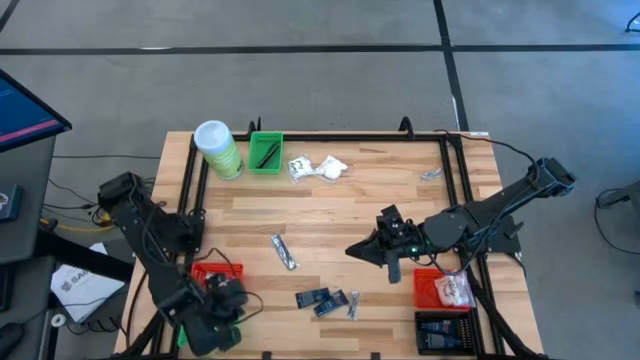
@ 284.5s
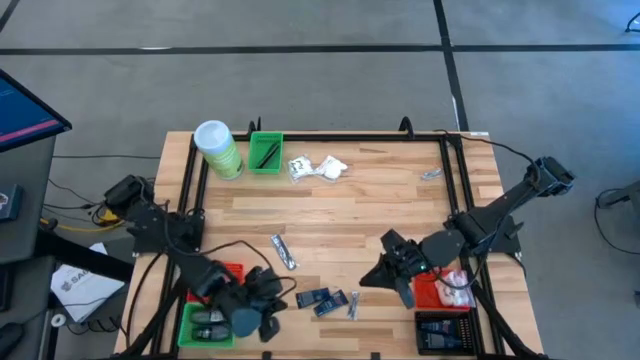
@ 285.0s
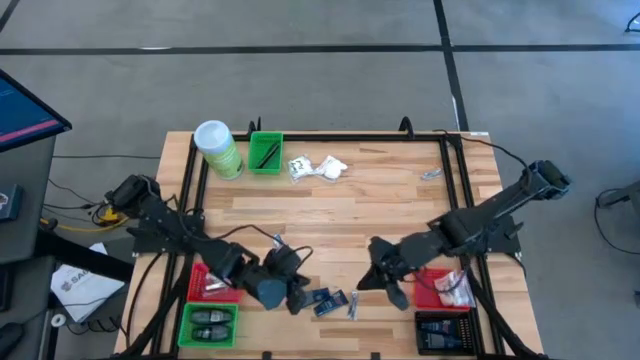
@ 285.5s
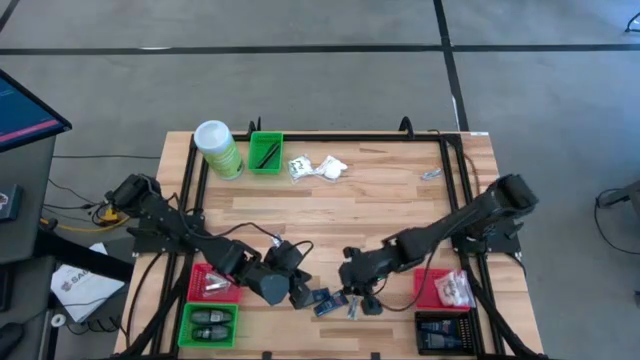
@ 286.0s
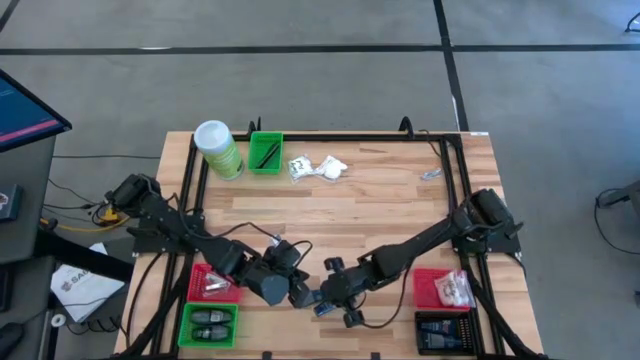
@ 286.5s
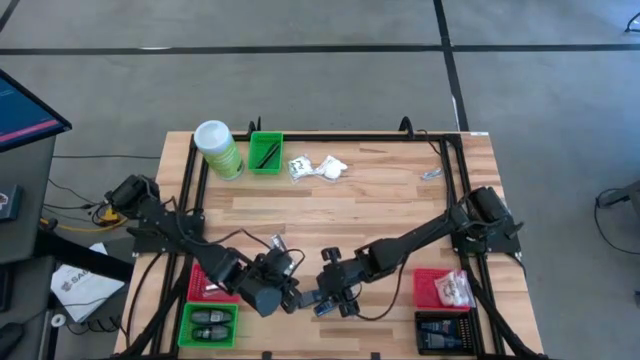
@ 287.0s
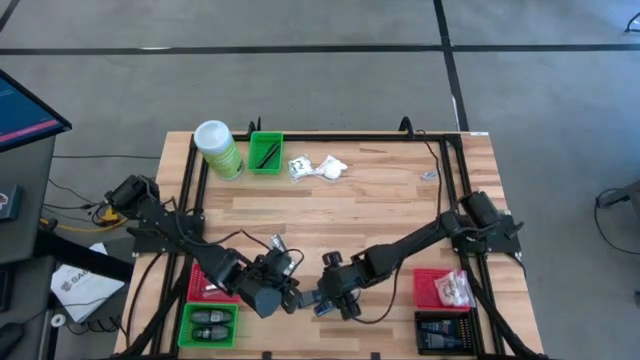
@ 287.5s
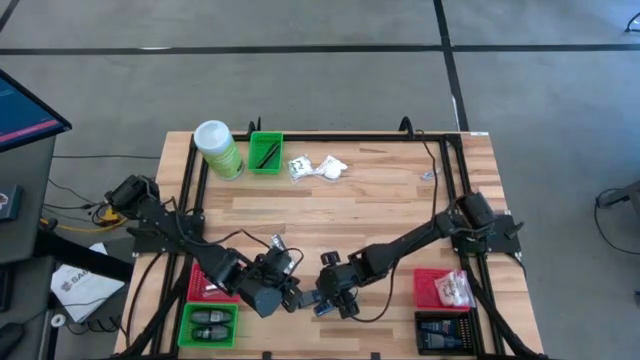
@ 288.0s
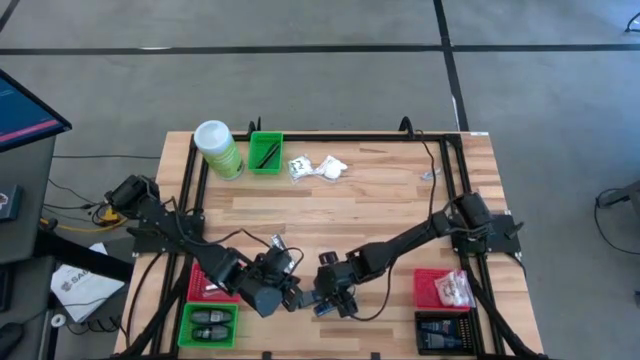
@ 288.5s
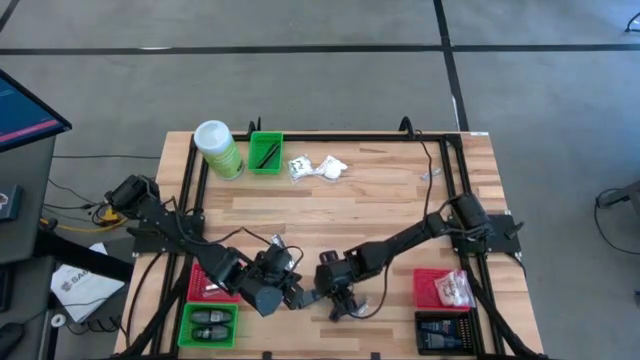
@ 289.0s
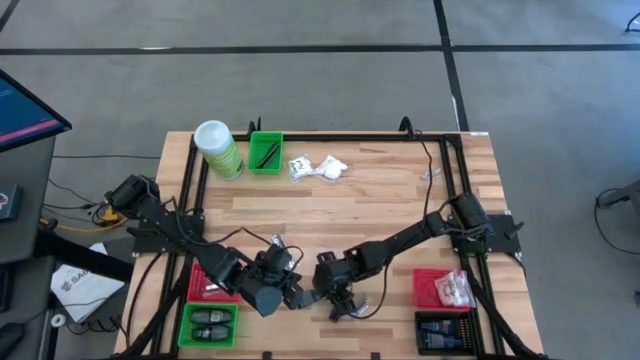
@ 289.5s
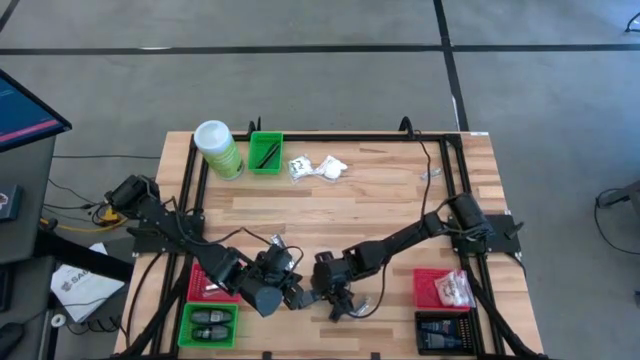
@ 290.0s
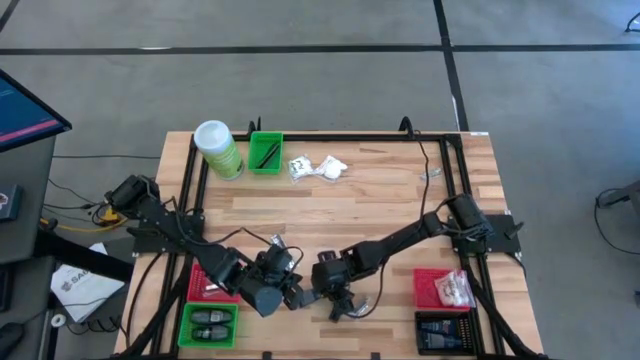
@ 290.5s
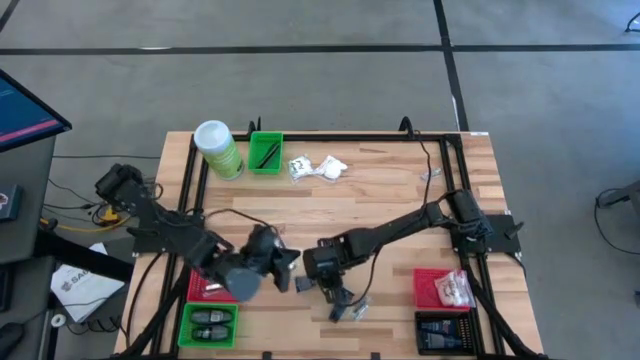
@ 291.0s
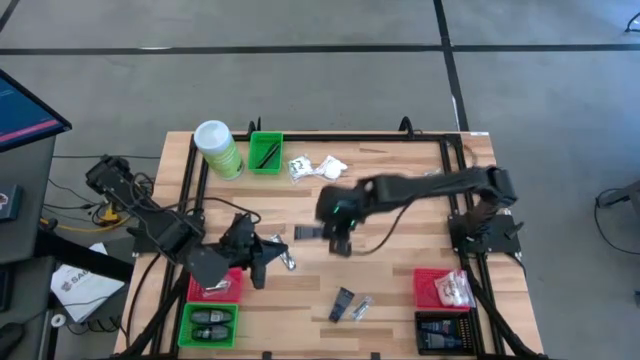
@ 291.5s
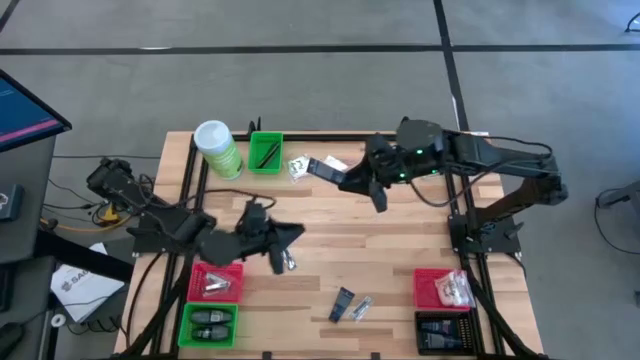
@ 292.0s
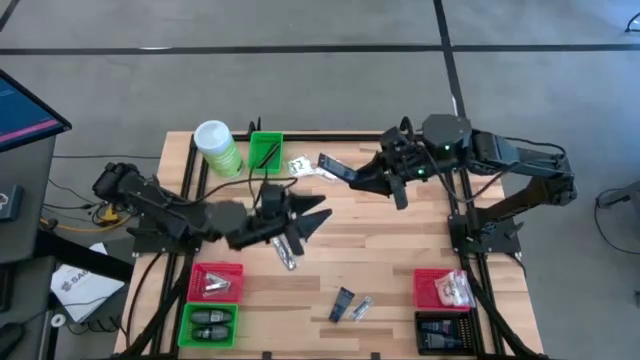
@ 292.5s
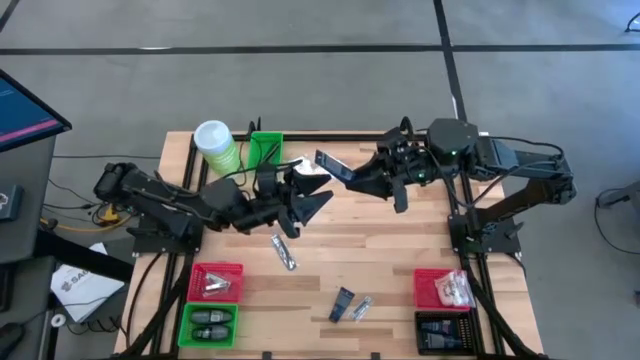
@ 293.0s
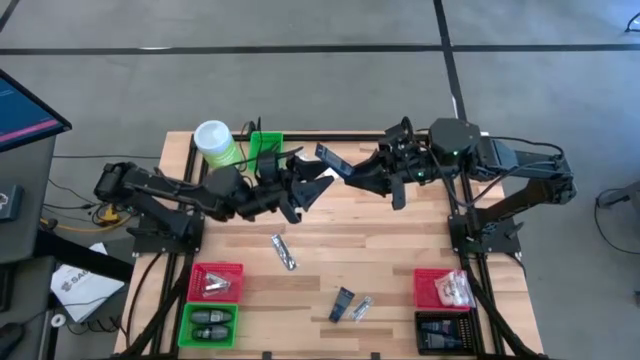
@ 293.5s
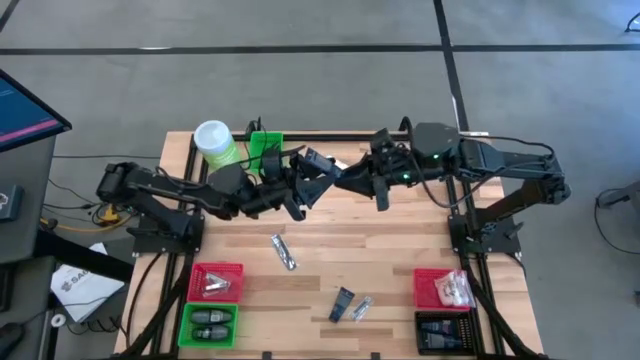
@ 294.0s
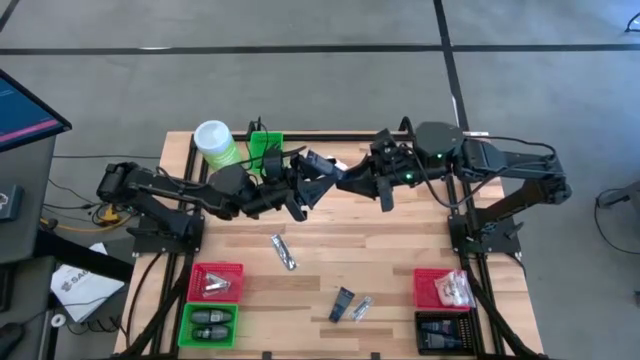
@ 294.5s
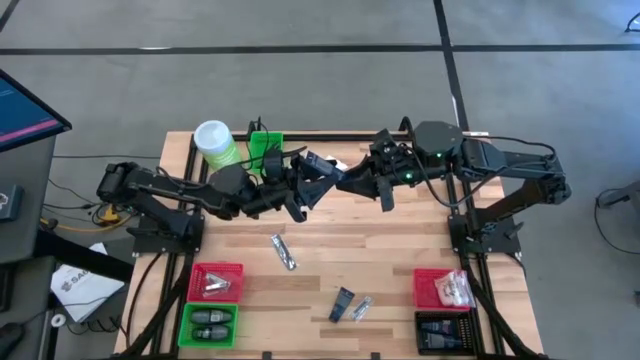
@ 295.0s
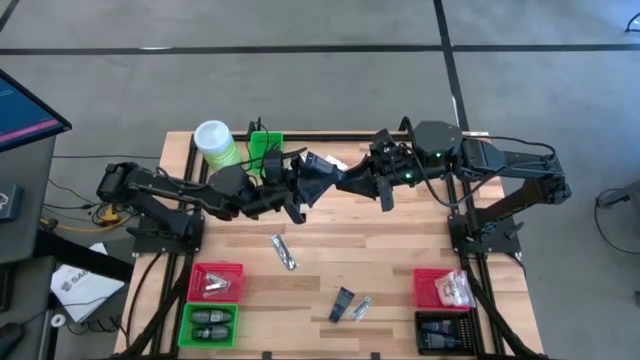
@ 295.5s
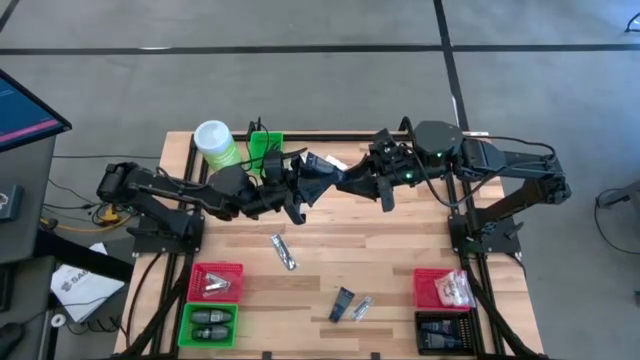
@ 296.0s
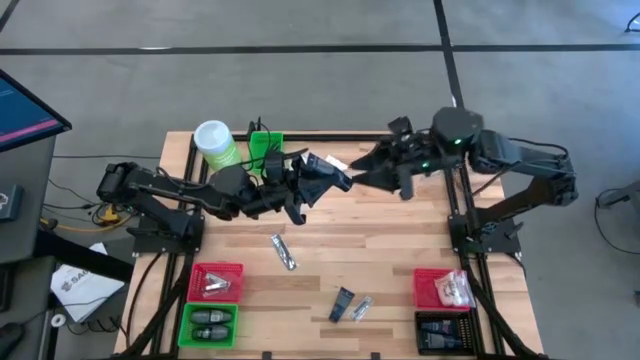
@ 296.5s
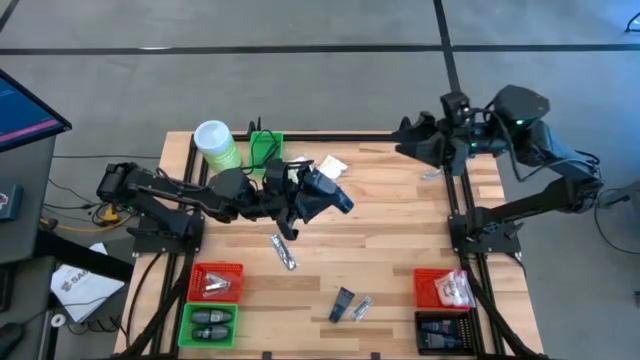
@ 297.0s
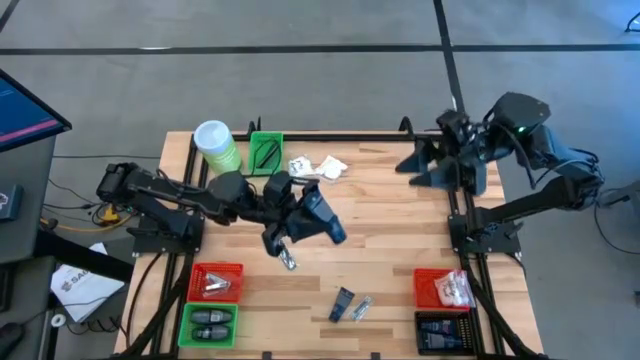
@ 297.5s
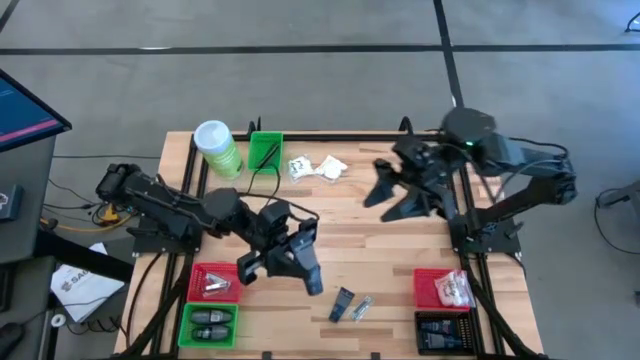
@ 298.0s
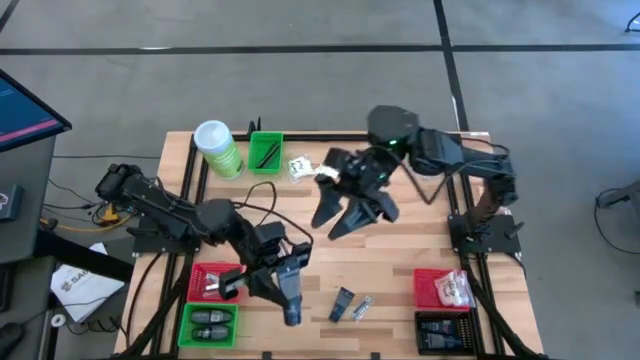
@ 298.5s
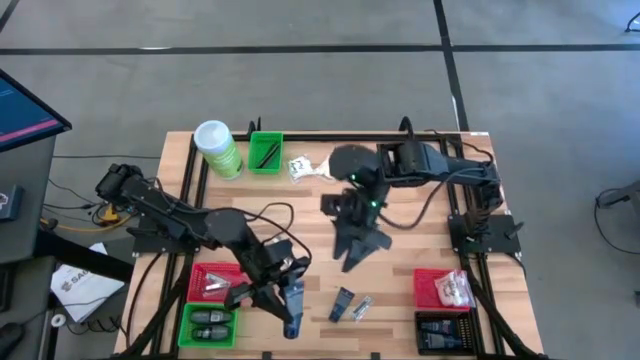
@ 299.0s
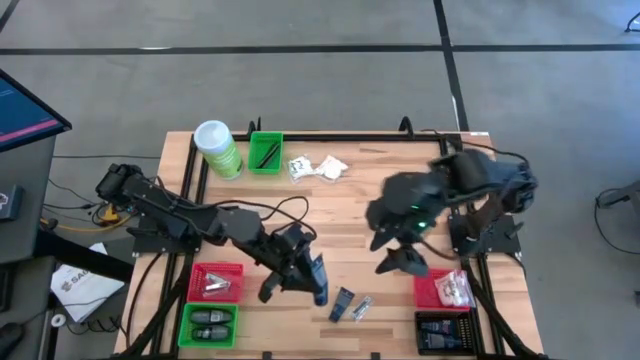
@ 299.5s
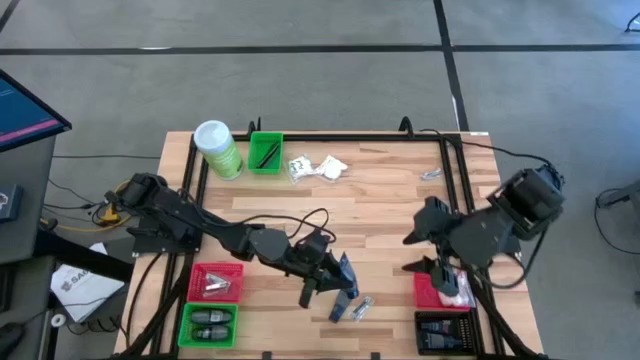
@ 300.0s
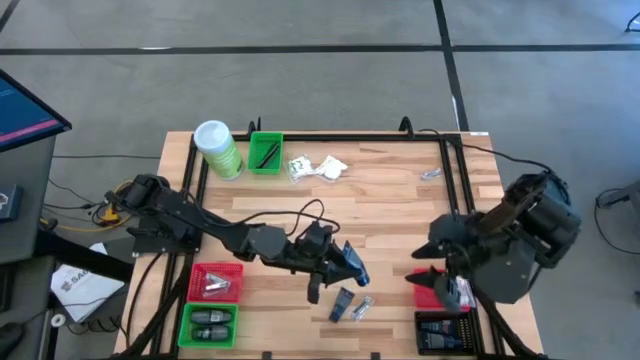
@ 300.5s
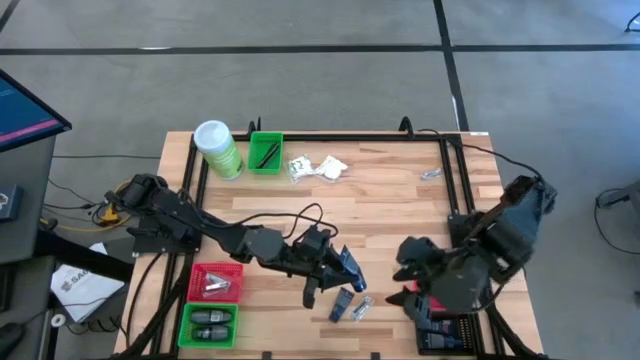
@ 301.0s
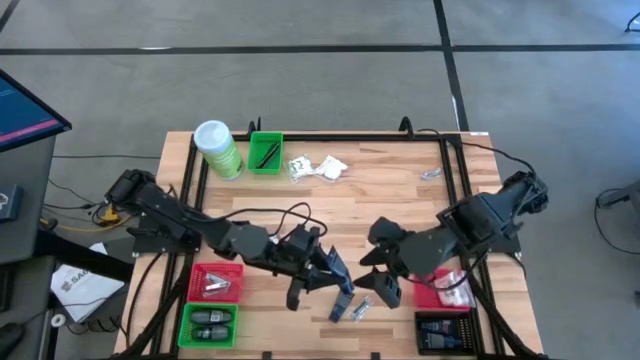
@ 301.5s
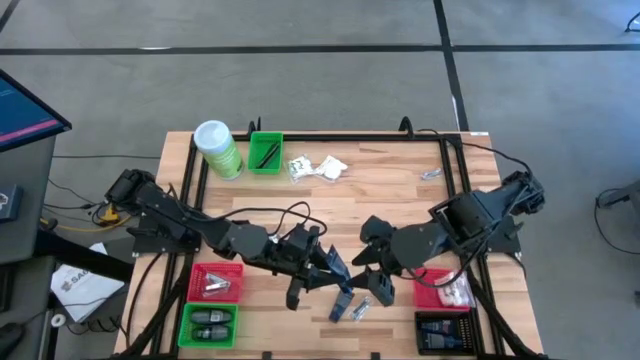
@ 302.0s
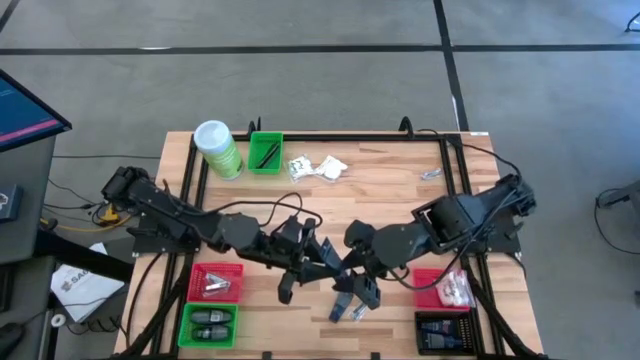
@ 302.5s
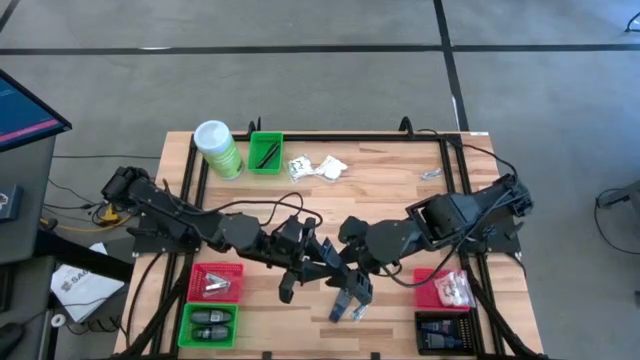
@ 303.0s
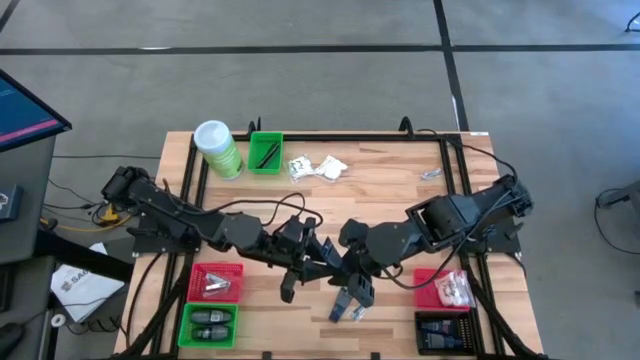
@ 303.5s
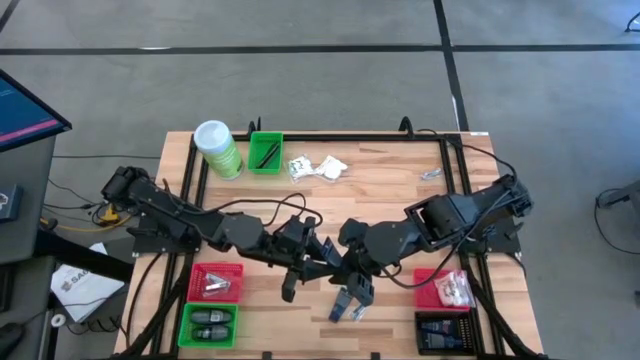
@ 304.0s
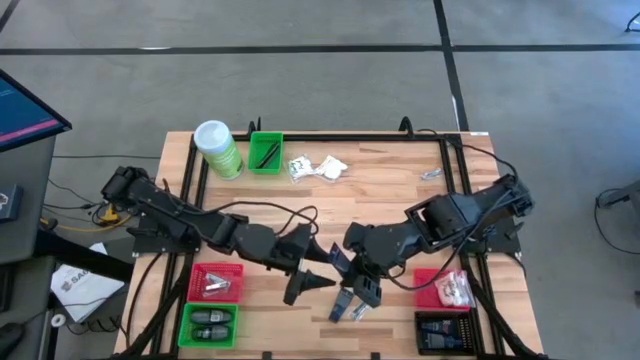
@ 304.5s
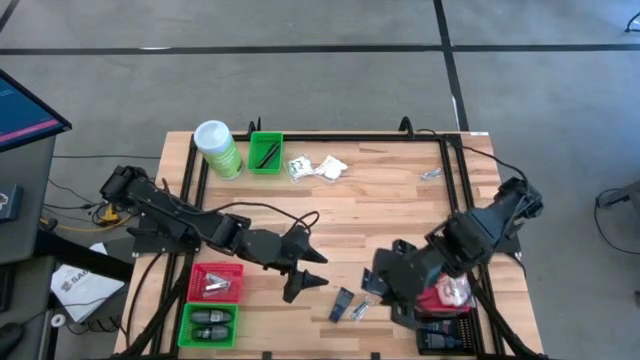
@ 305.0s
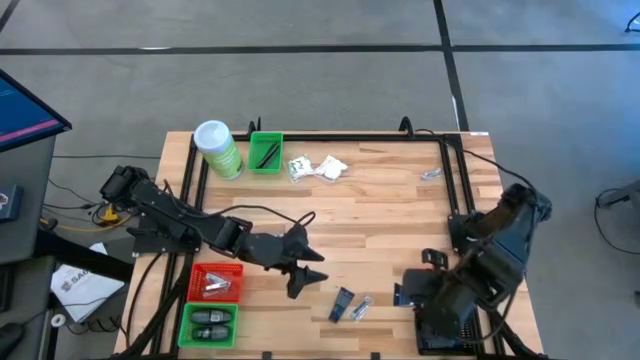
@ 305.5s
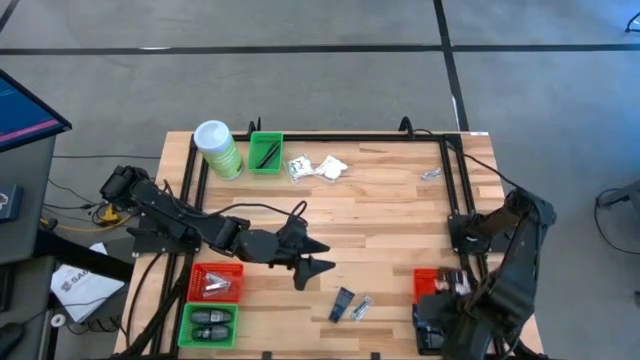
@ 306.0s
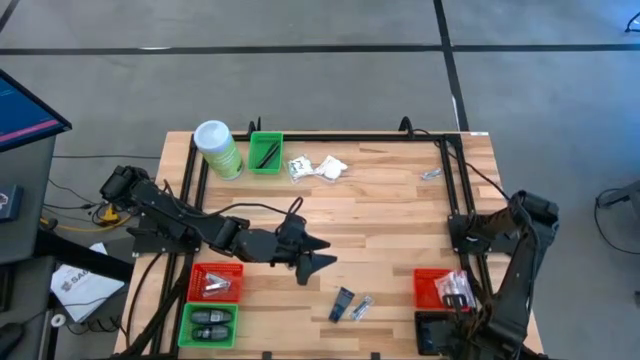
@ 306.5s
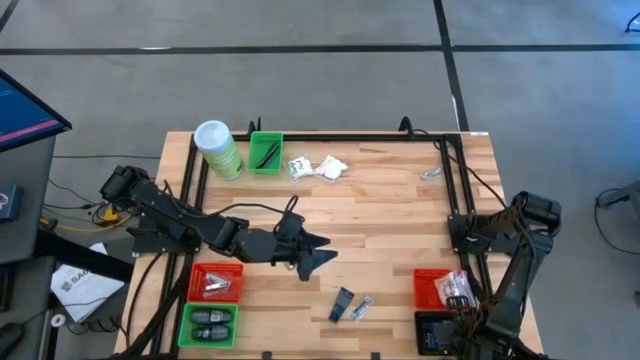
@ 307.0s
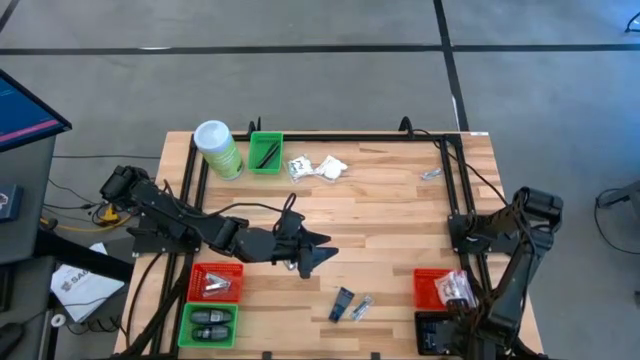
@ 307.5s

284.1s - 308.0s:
Task: Pick & Place Travel size toiletries
Put the shave cream into the black bin
